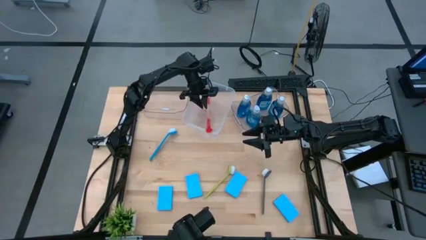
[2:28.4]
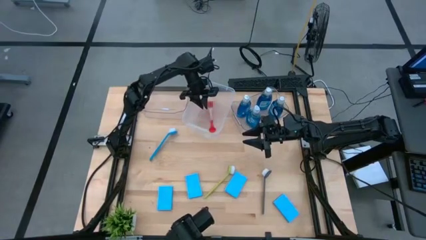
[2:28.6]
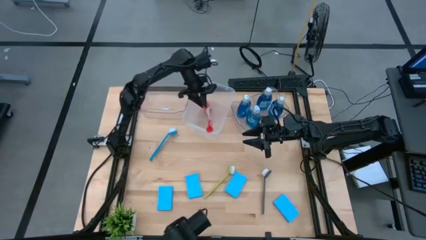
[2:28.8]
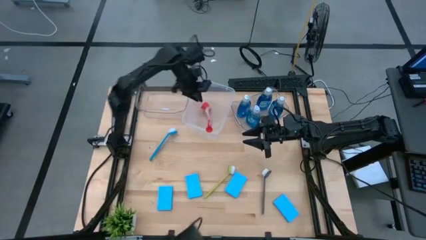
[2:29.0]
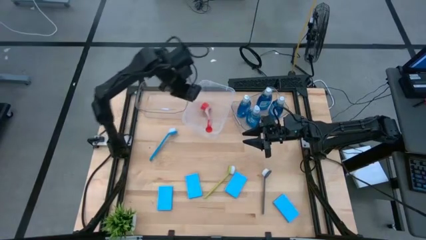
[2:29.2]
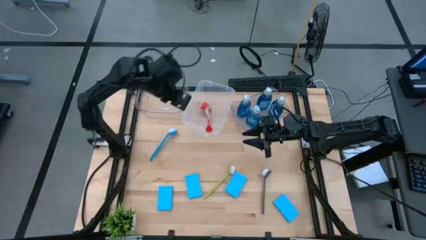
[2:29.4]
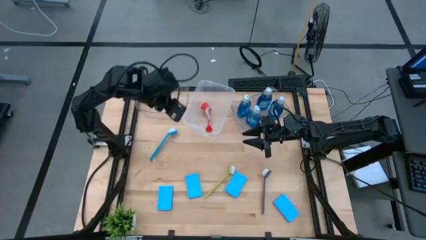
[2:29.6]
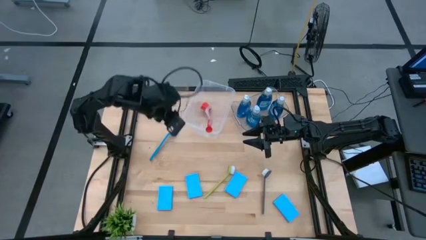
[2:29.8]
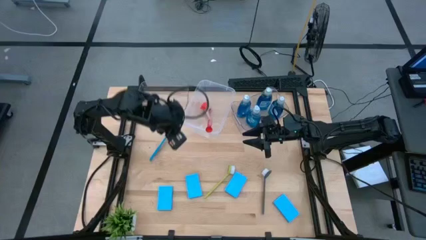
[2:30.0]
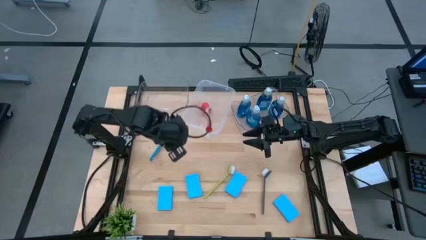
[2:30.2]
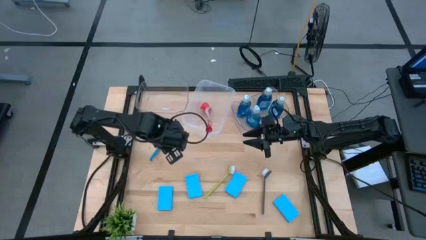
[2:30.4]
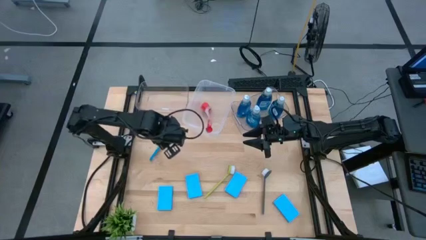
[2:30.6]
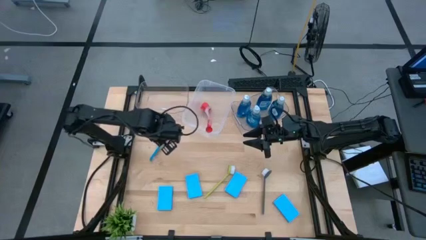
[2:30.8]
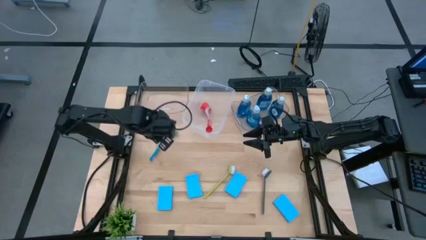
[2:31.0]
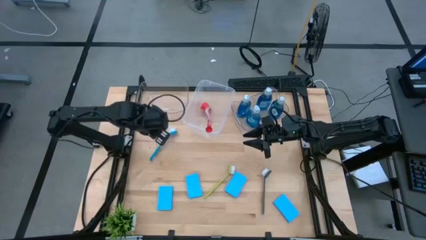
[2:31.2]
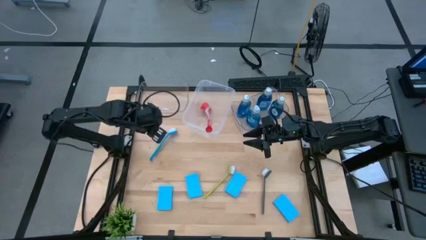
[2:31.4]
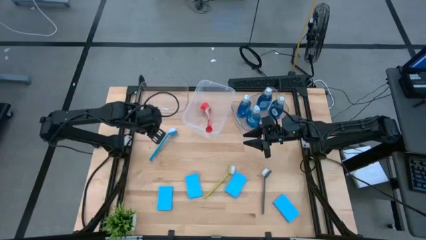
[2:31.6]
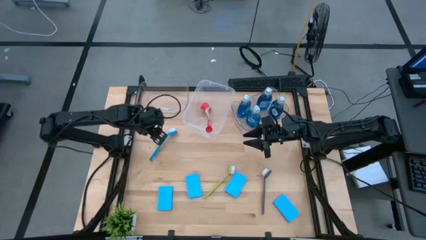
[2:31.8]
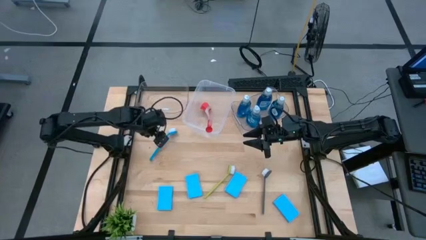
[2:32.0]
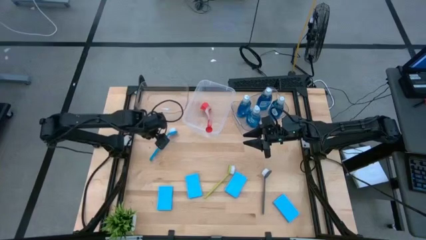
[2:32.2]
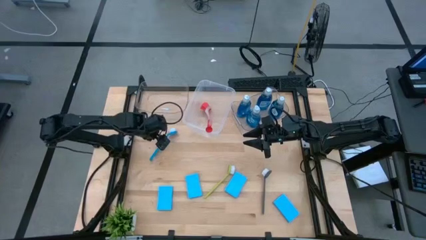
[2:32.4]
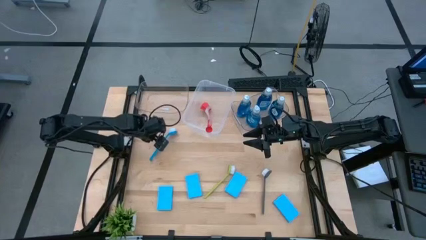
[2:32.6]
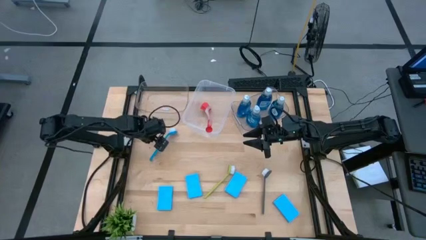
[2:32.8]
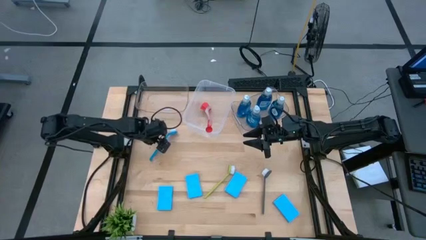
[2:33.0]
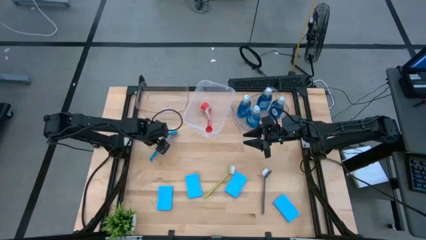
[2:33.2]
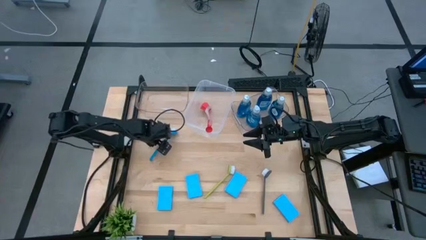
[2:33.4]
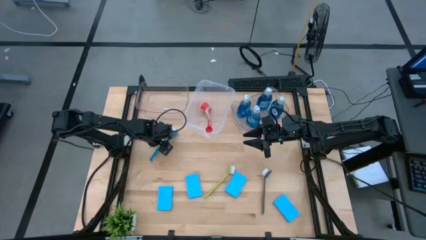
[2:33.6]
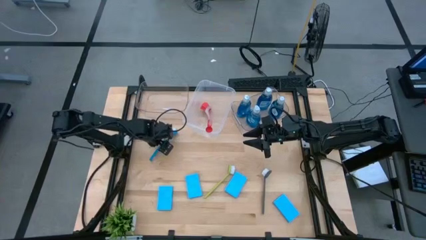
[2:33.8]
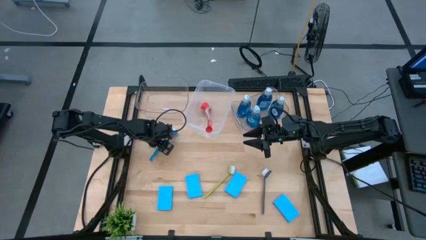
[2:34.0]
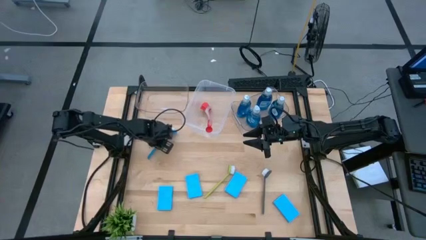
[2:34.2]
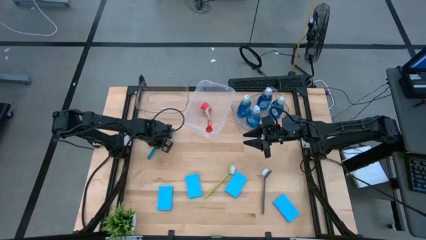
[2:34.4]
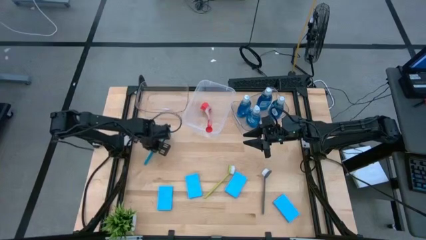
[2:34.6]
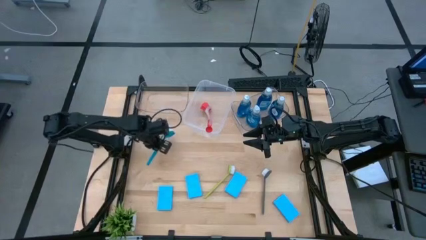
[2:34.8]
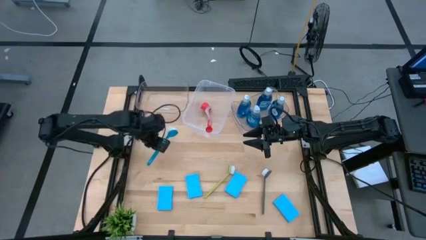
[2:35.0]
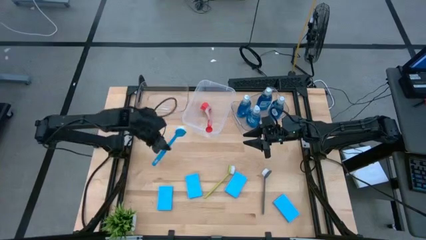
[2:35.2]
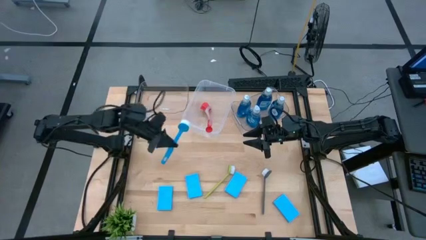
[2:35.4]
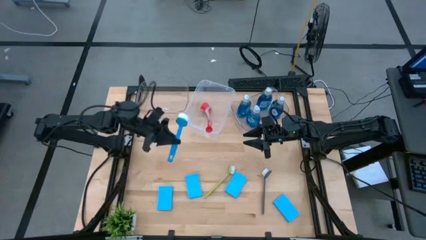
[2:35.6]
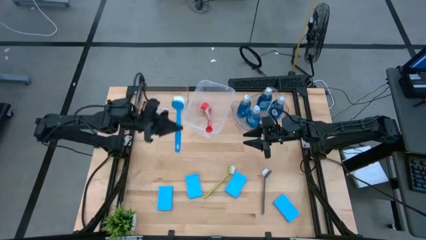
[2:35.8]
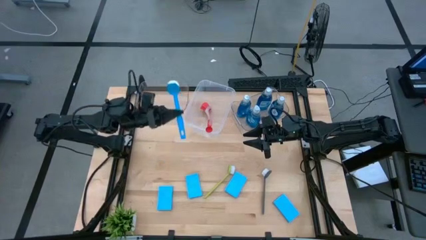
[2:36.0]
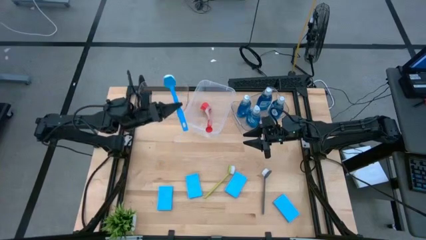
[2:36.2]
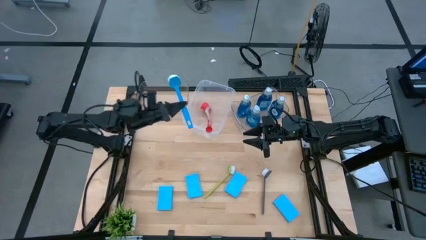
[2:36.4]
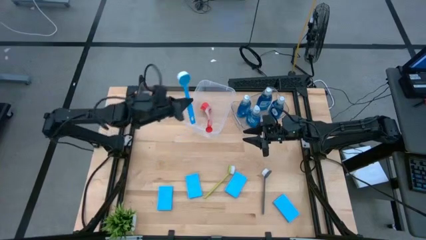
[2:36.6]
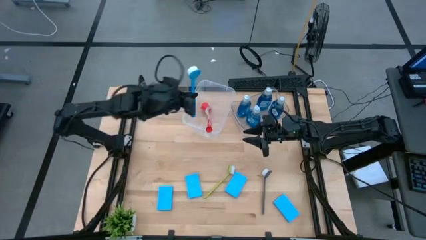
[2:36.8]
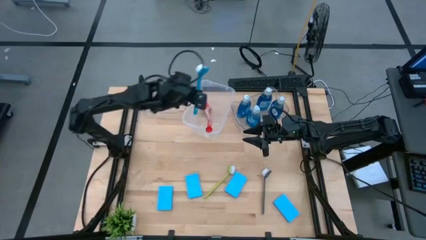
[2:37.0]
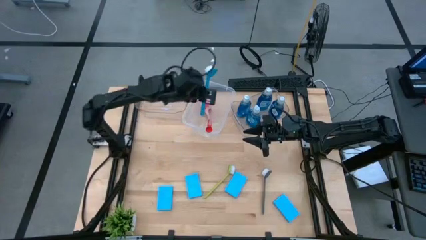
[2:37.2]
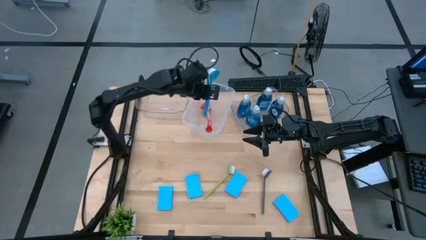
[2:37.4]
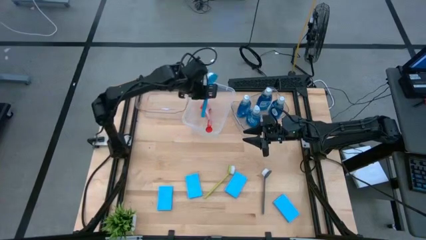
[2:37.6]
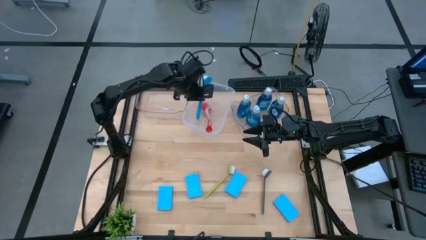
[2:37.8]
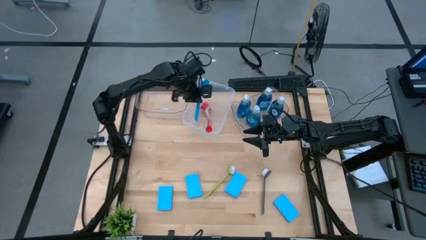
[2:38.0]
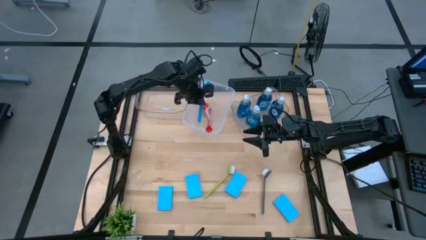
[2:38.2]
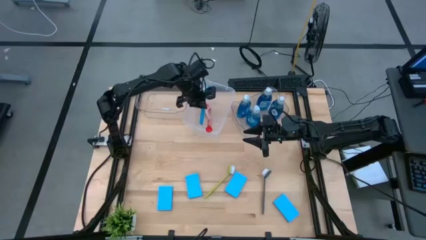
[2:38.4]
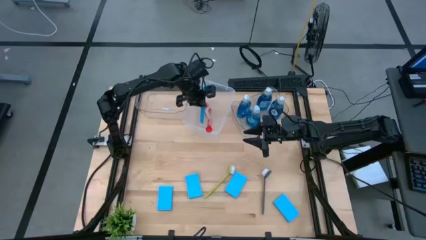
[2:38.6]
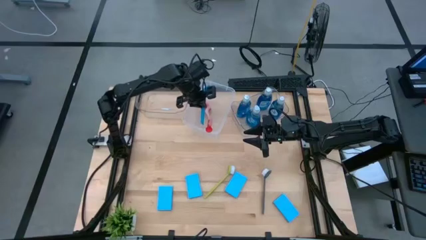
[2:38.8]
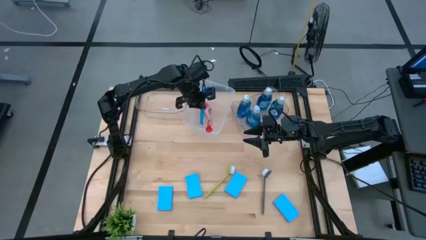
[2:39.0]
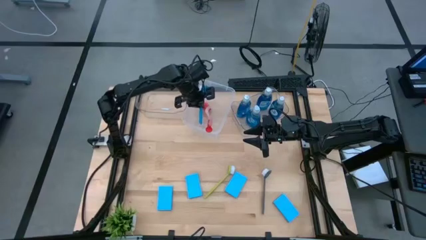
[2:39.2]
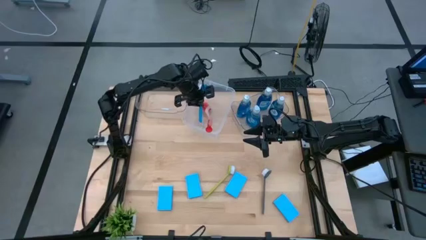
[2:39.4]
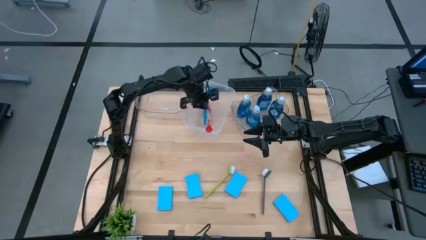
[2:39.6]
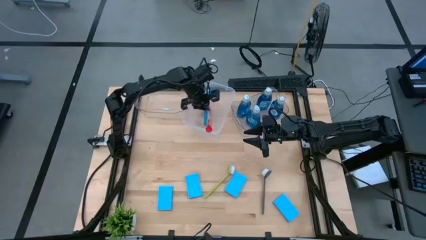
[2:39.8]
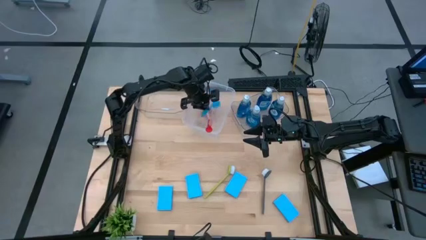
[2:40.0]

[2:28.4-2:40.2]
Task: Pick & Place Kitchen Sink Supplies
Put the blue dish brush into the transparent container

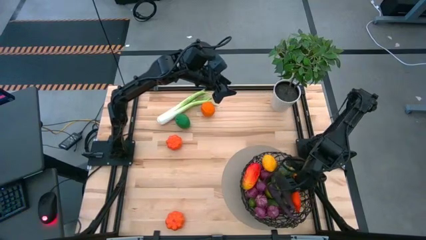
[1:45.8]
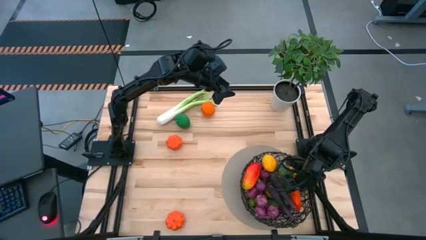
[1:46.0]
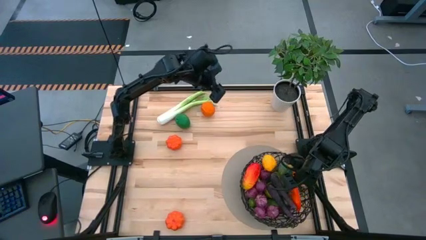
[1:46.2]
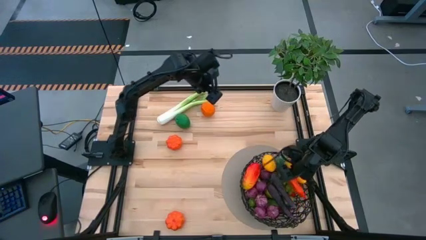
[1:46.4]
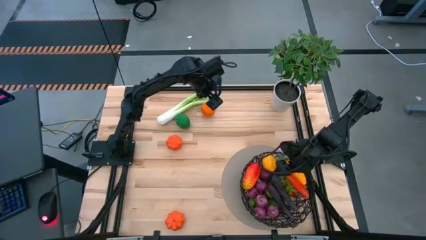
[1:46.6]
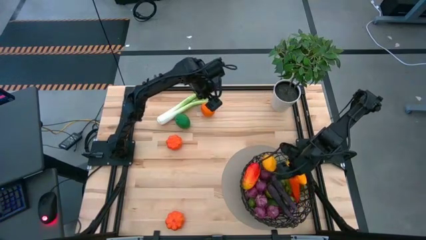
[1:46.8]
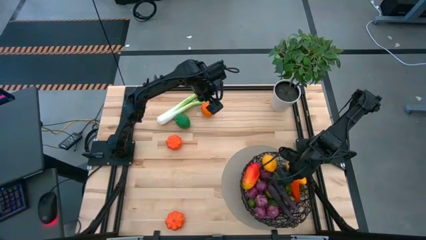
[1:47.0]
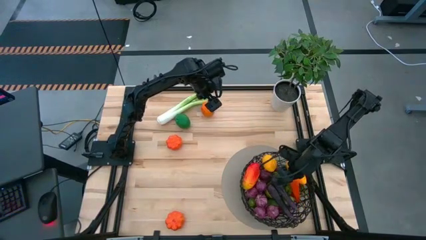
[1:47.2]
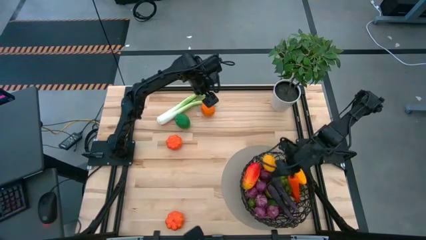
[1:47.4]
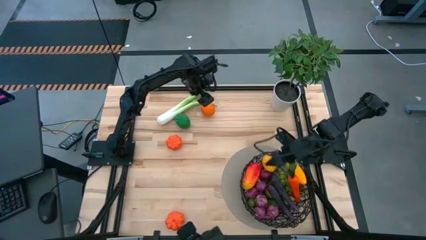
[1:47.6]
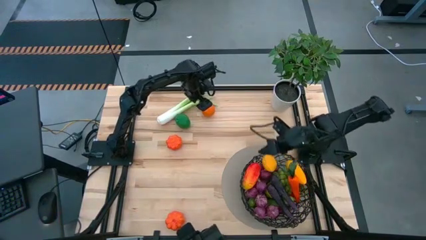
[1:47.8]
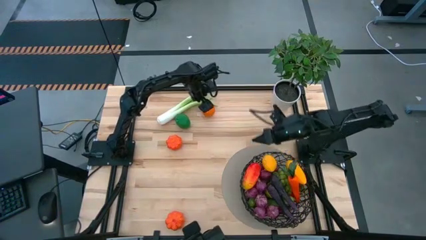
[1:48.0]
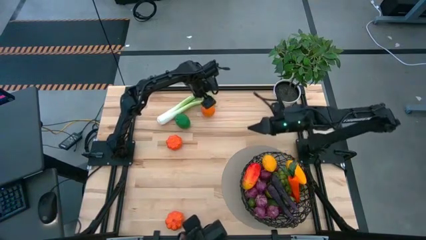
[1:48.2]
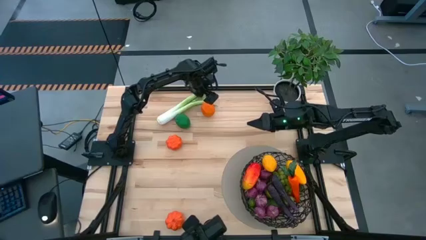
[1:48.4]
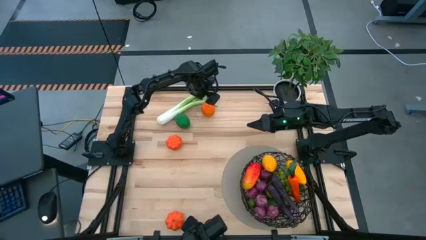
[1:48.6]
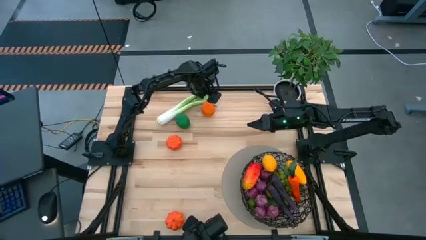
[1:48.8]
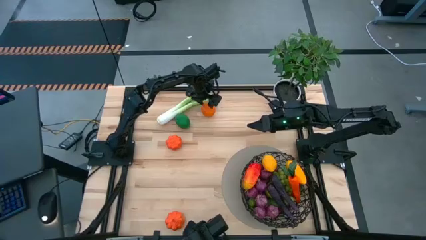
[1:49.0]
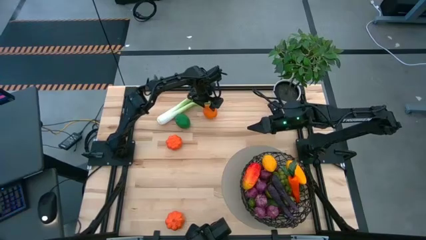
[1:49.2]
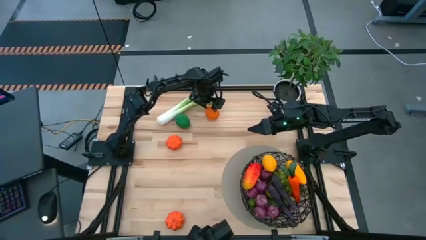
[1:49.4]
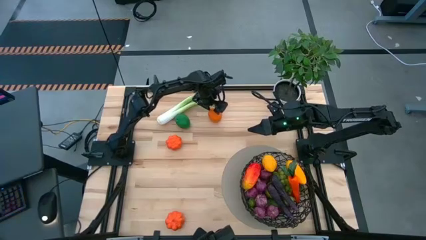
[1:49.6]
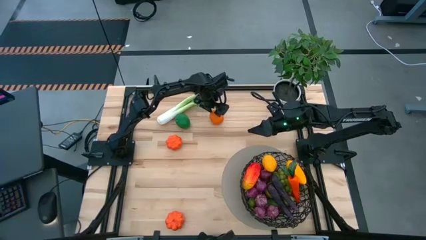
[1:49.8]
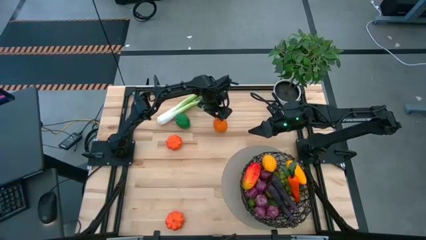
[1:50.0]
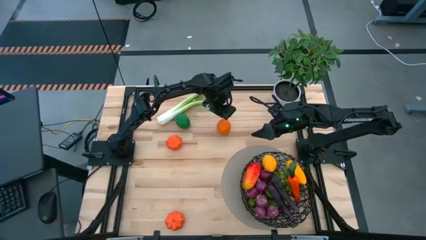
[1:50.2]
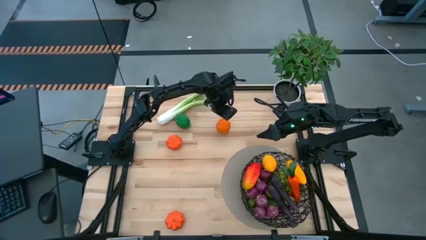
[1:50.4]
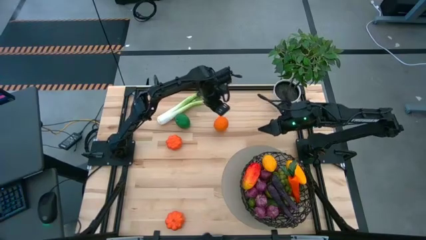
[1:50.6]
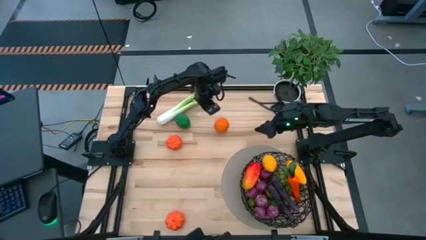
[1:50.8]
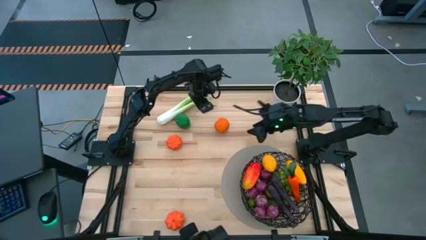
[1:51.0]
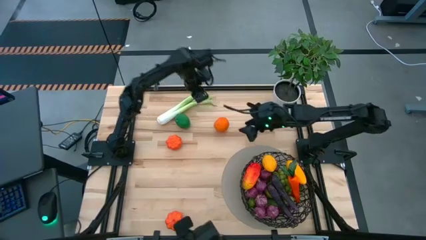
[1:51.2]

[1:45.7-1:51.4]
Task: Build produce basket
Put the orange into the black basket

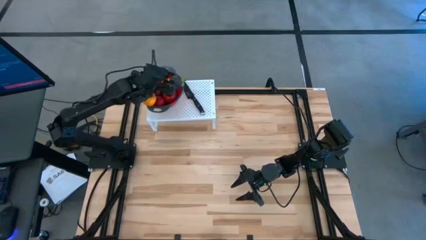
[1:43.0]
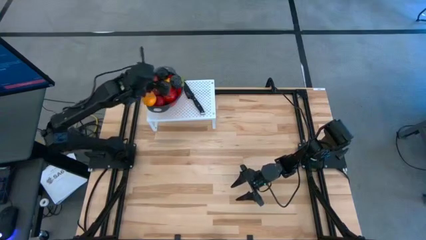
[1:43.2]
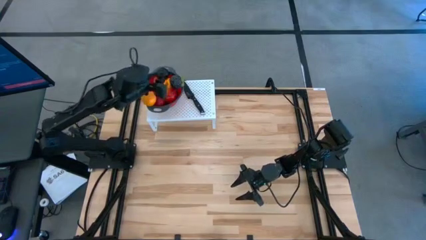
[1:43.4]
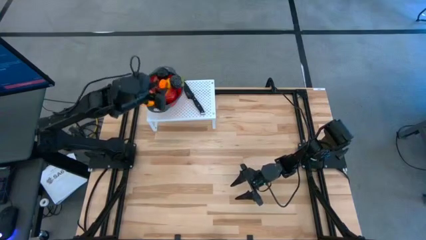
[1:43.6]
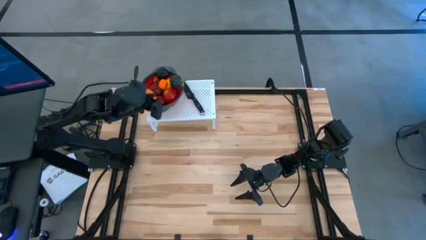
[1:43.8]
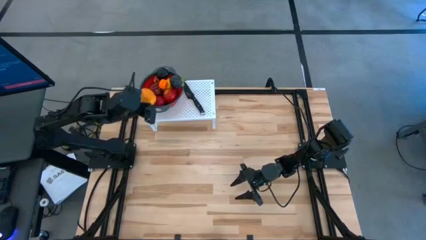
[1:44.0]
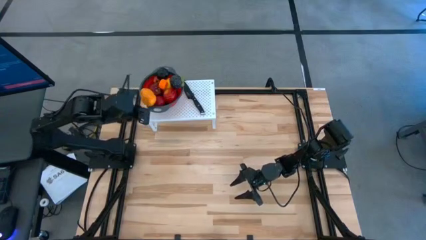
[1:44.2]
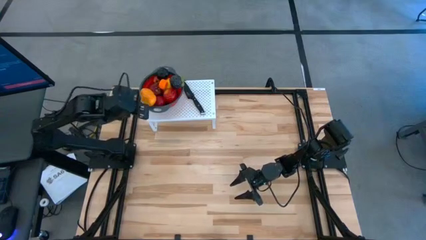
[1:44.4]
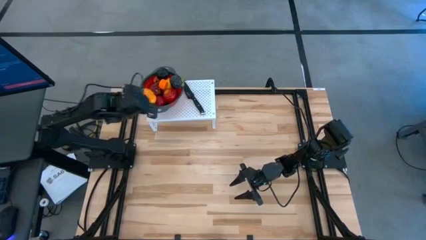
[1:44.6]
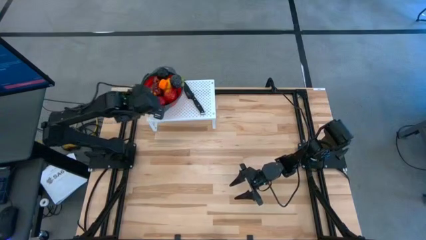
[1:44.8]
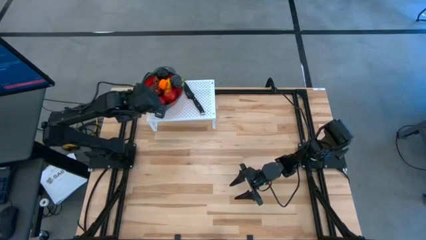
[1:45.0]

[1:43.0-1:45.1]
Task: Pick & Place Fruit
Adjust the mango
